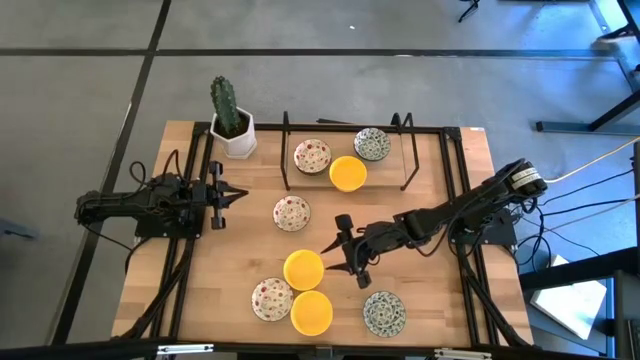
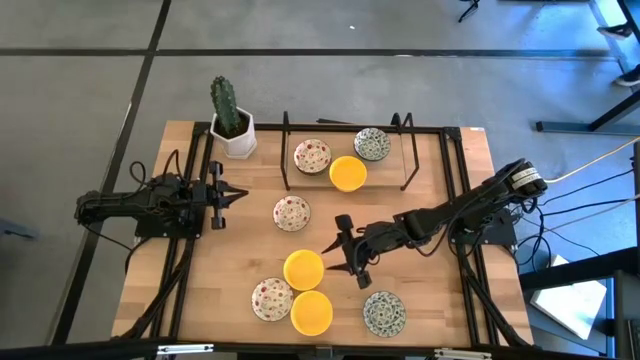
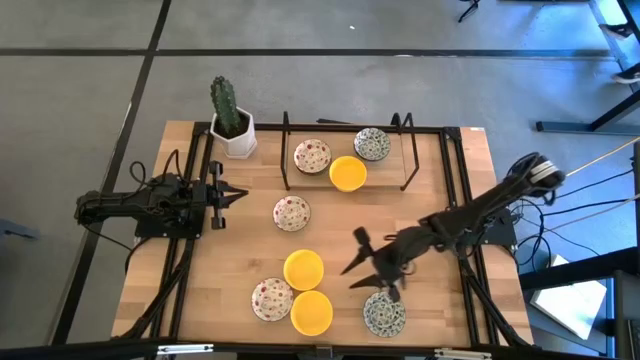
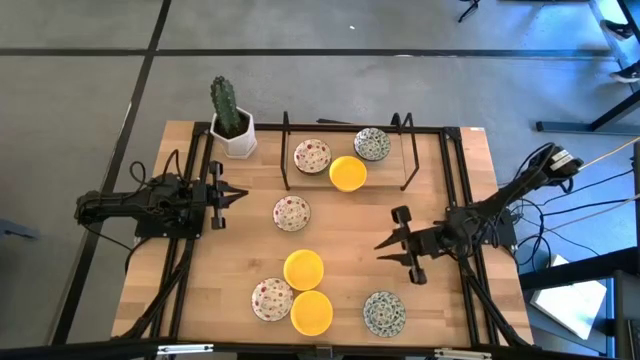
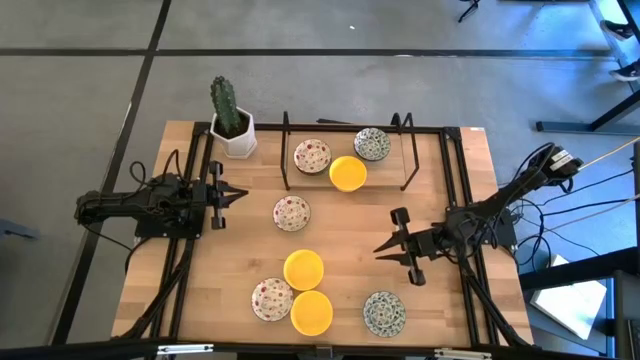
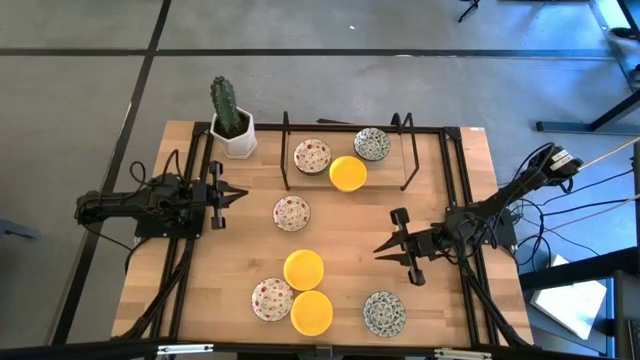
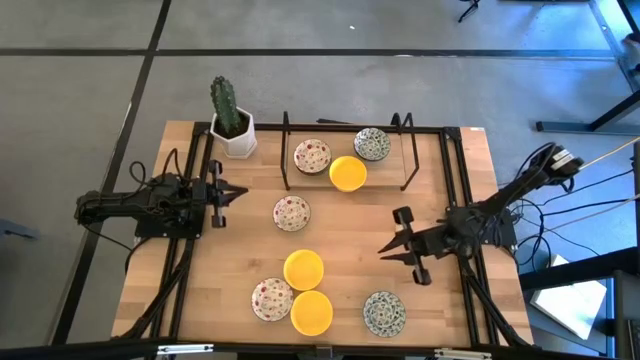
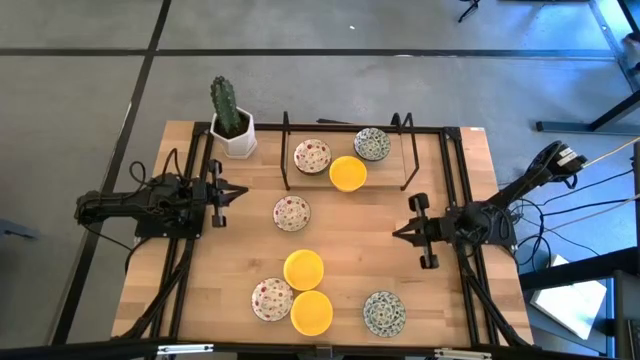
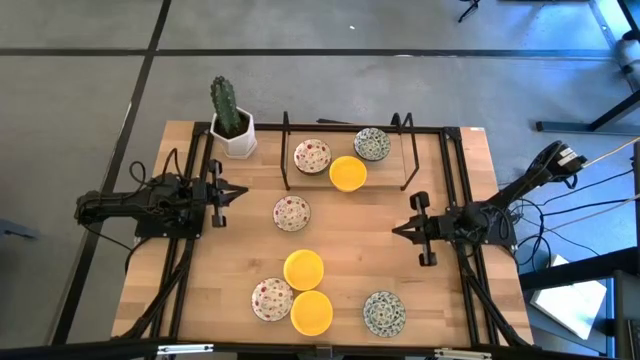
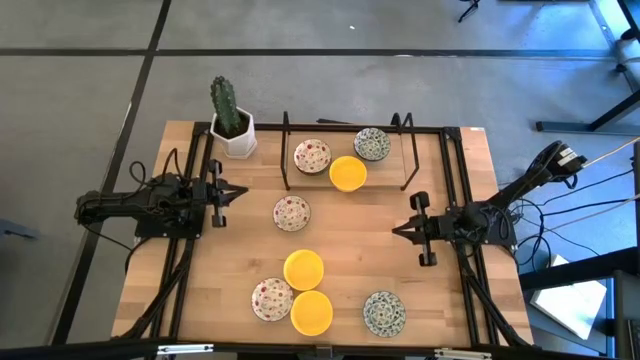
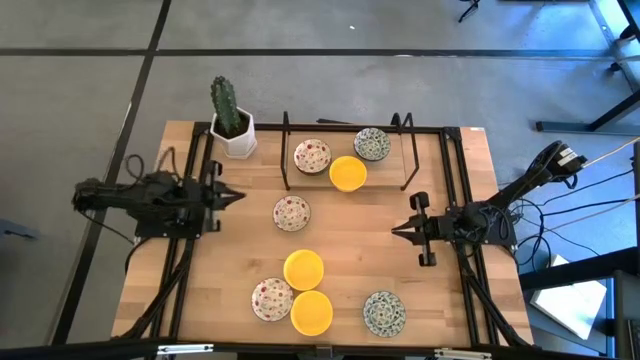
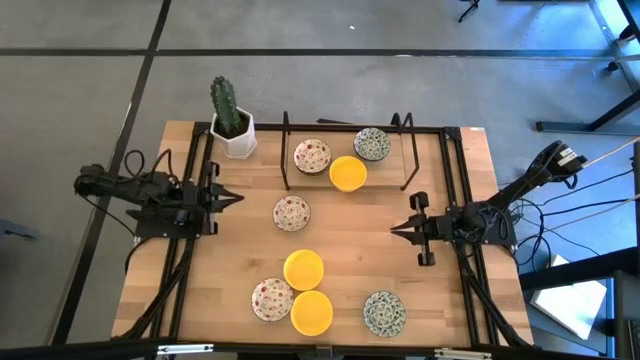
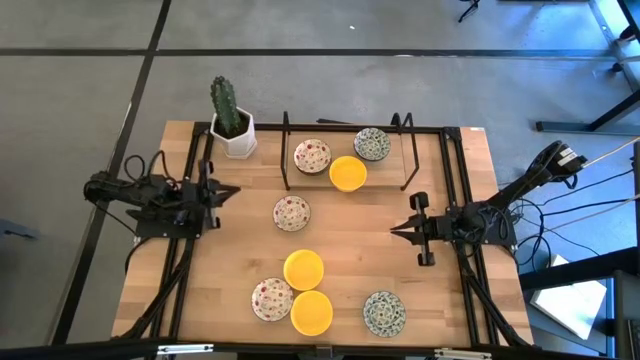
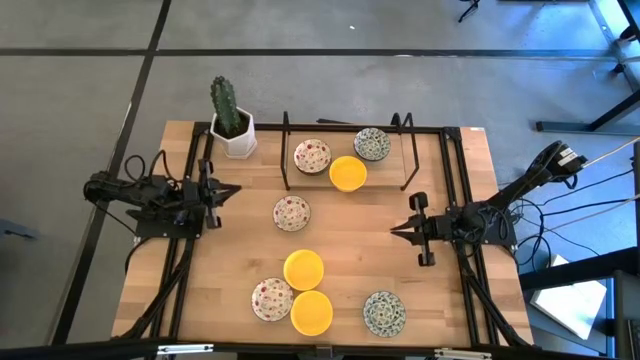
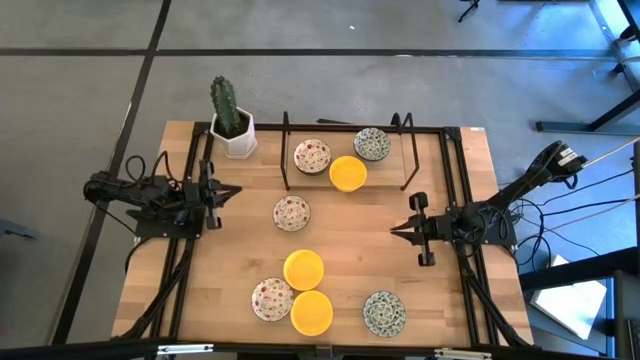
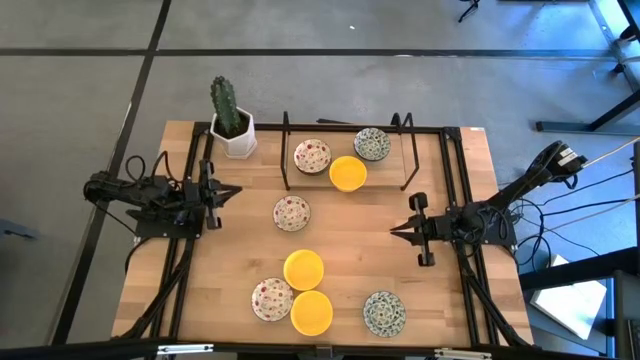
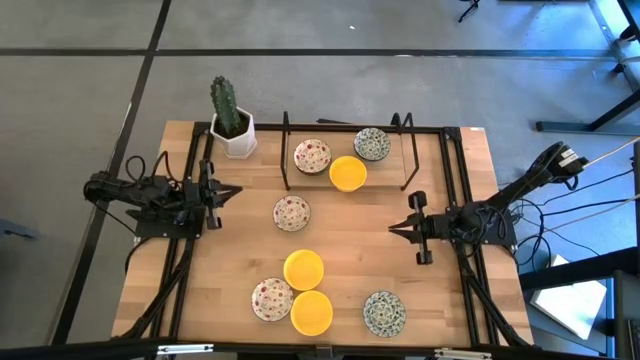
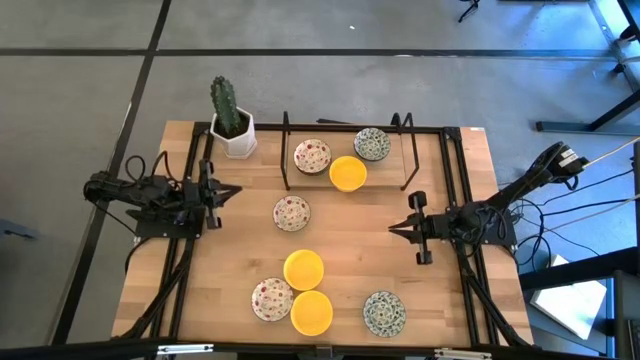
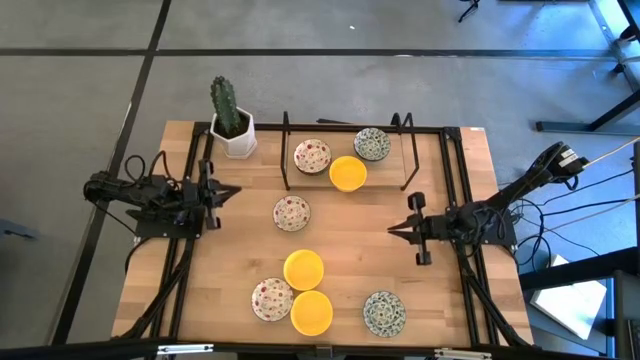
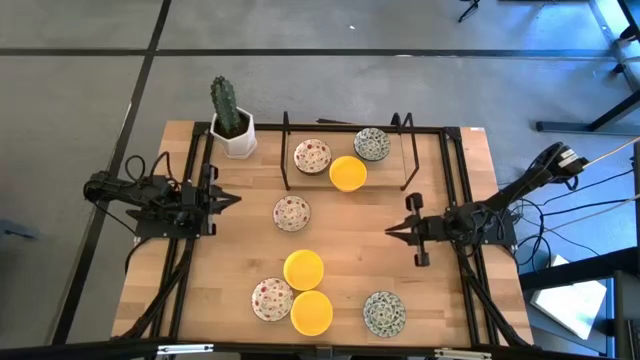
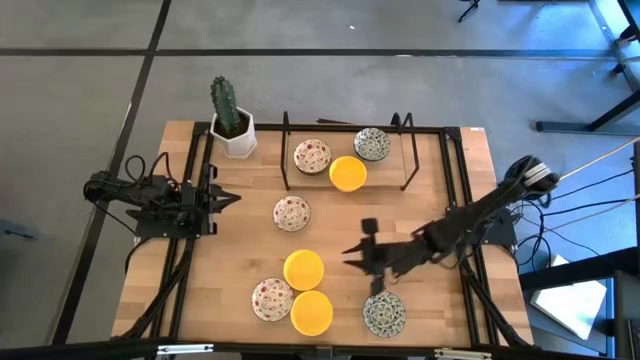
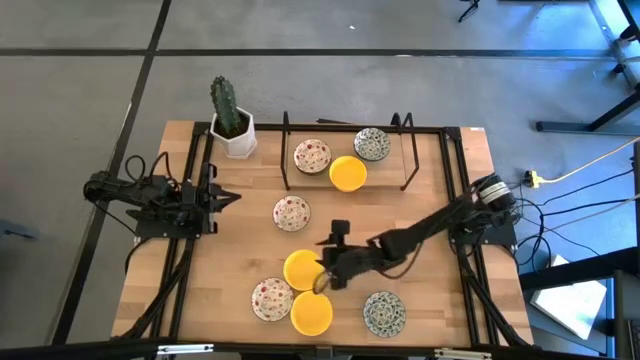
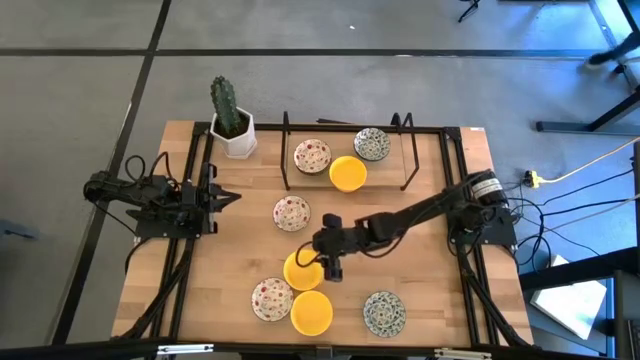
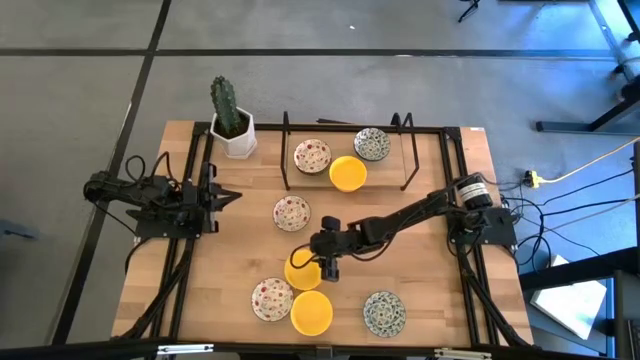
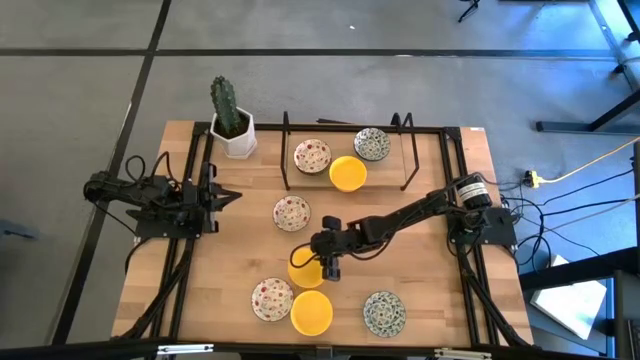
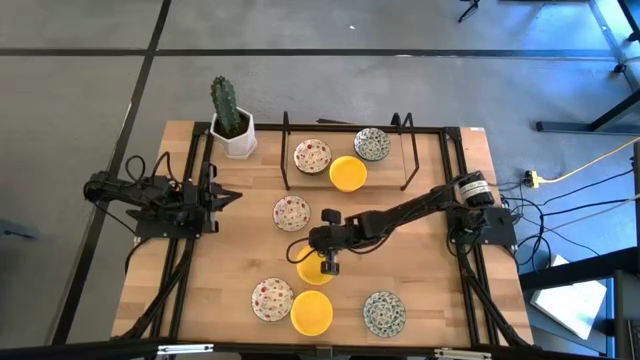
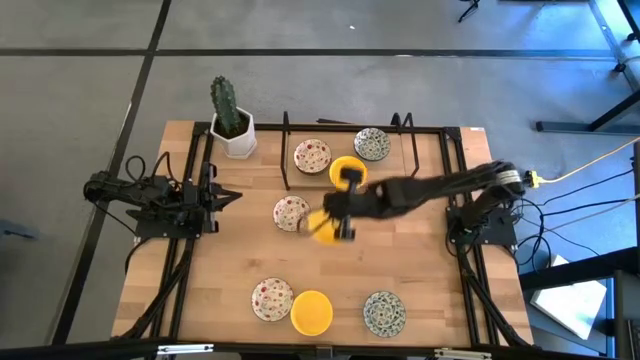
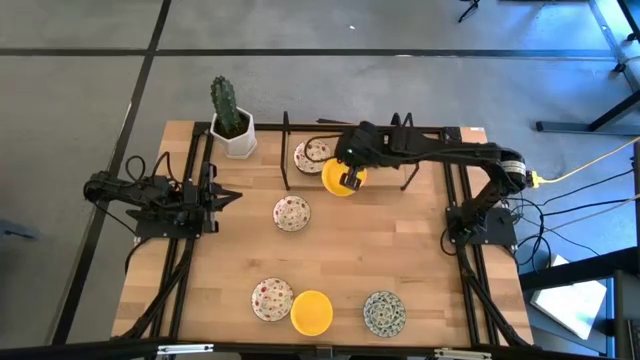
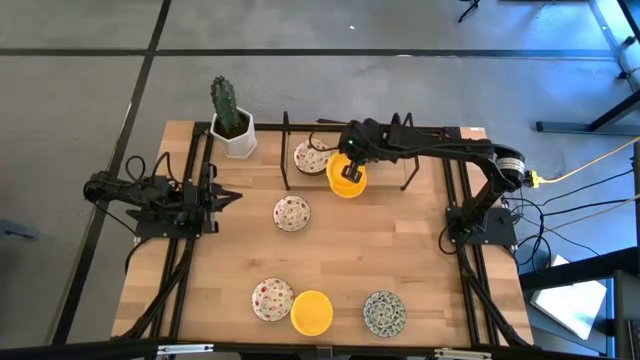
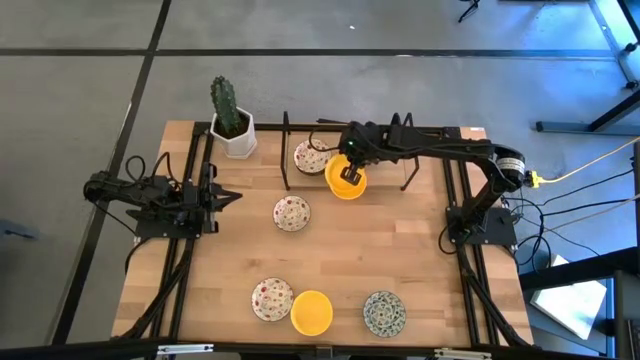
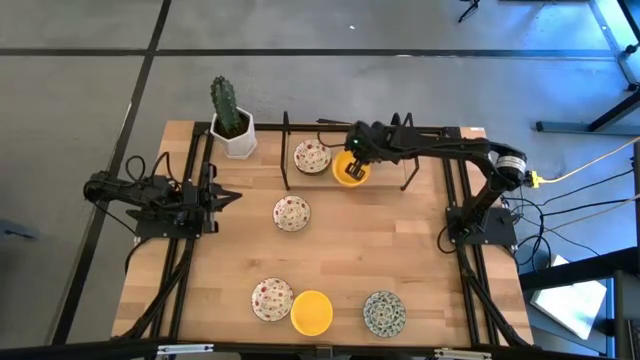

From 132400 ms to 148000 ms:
Task: Pick & Place Mini bowls
Stack the yellow bowl on the yellow bowls on the shelf

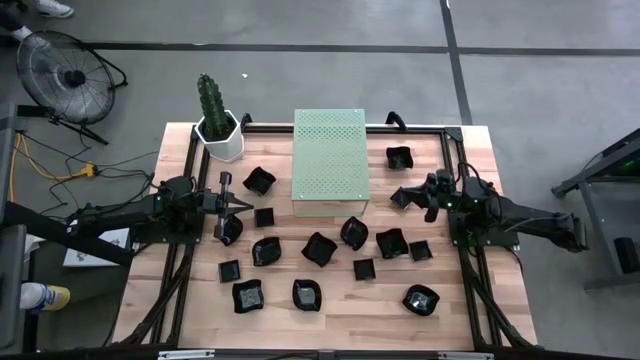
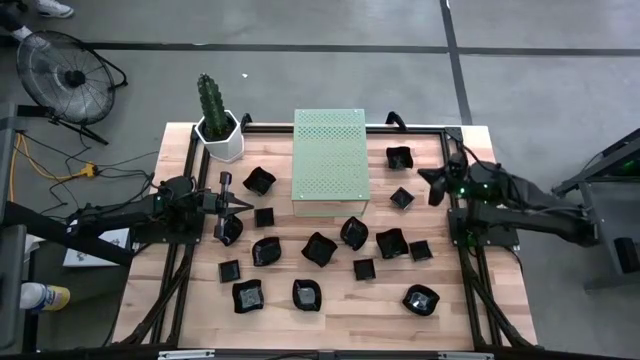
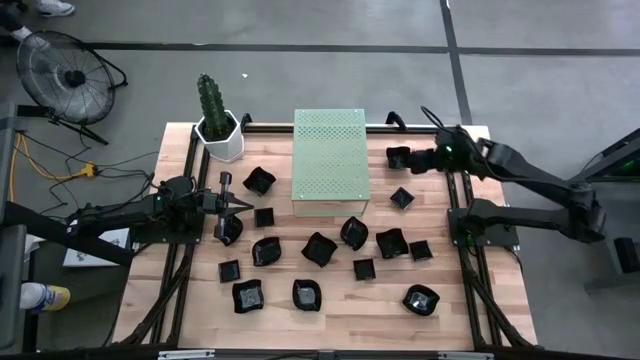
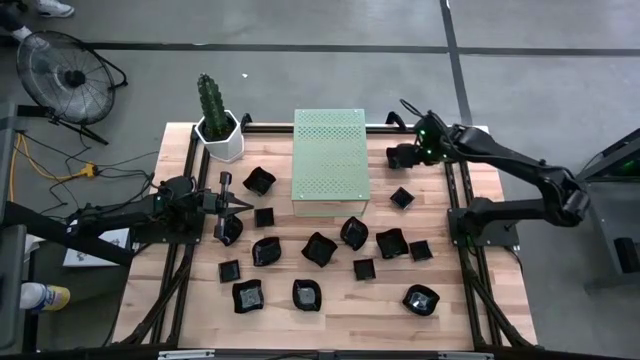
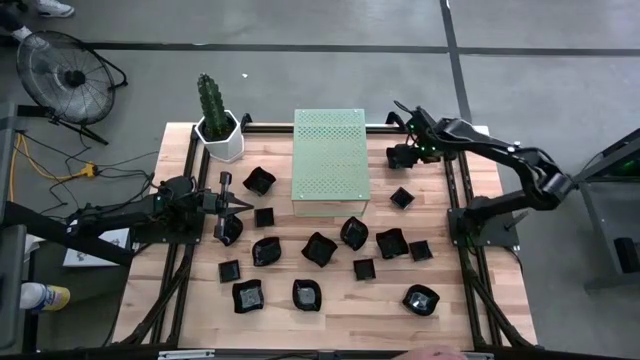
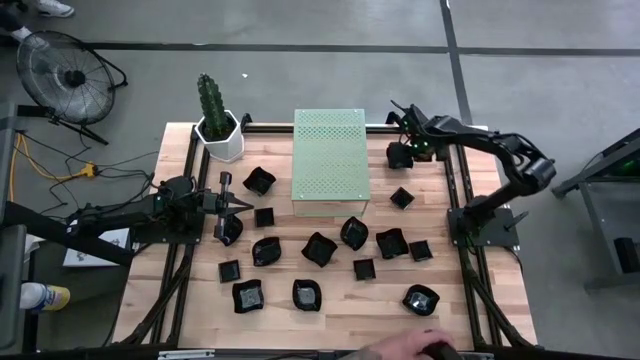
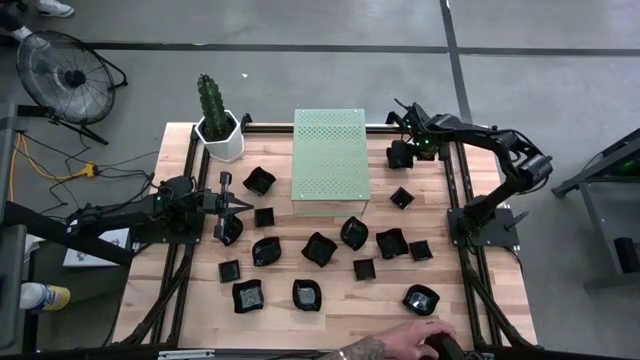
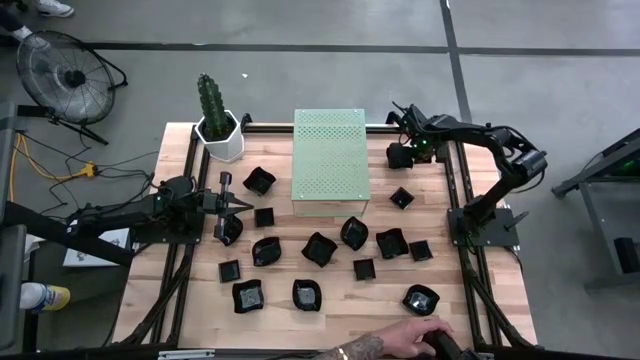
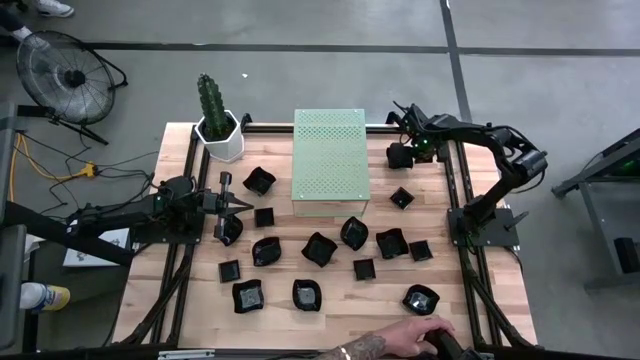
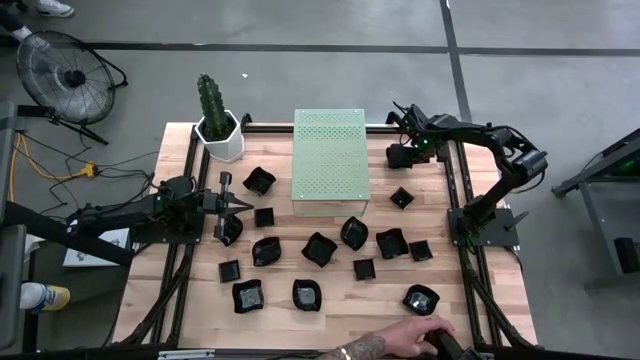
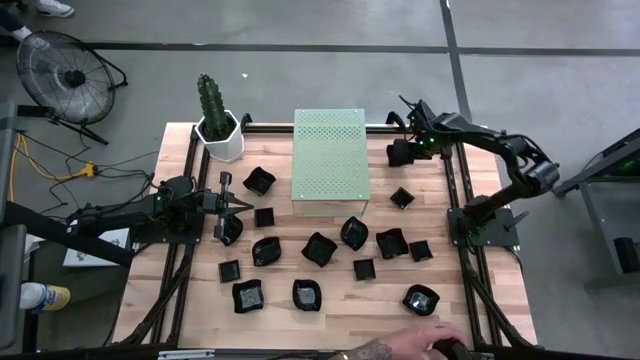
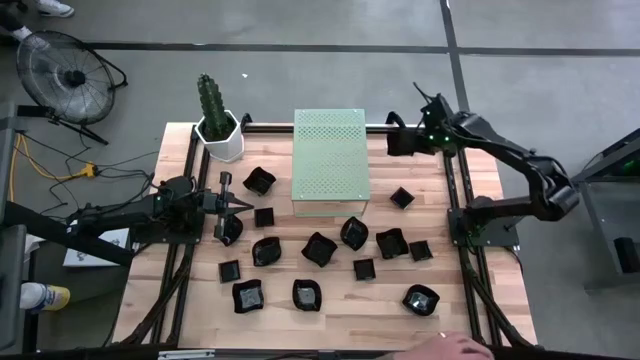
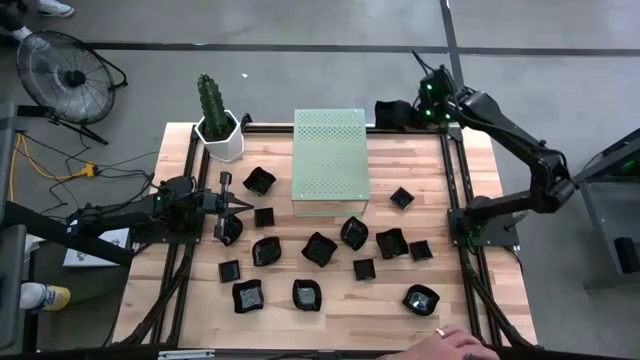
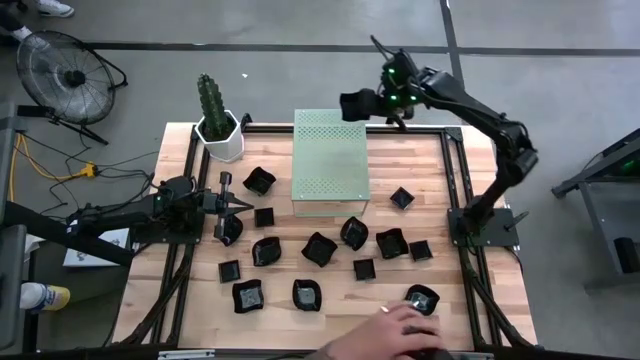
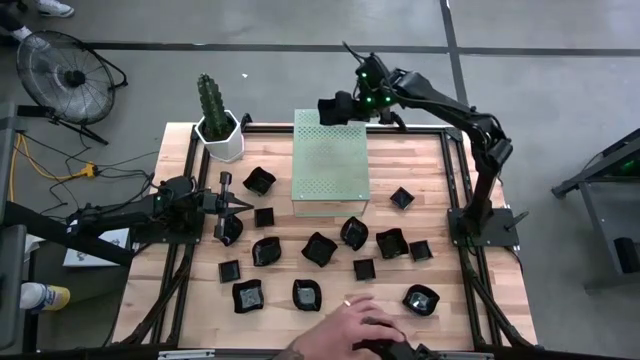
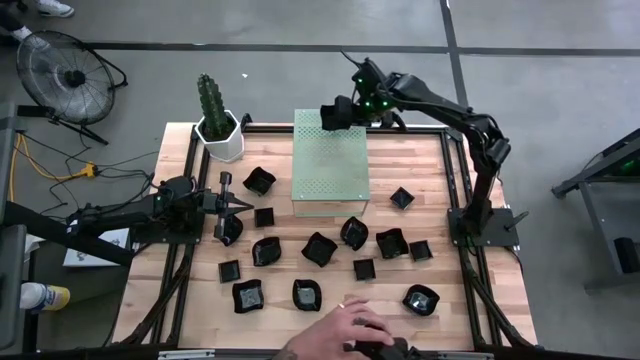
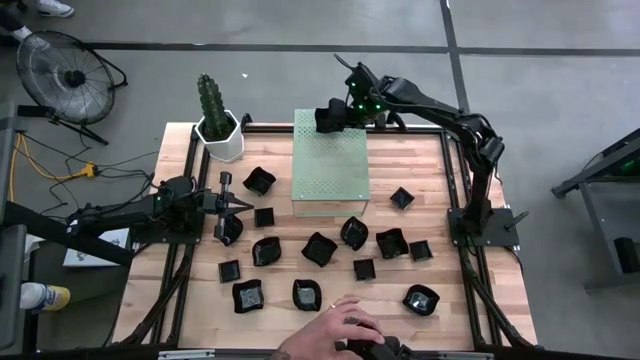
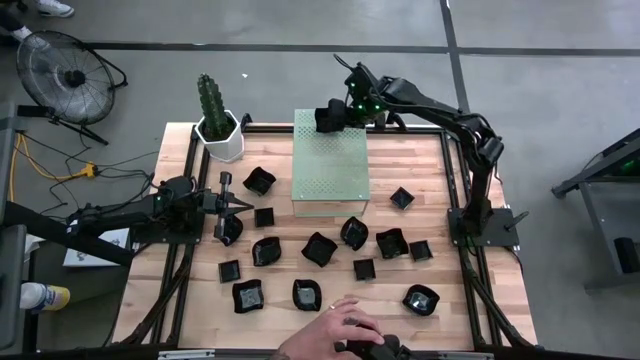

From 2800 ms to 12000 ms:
Task: Pick & Place Mini shaped plates
Put the black distorted square plate on the shelf
